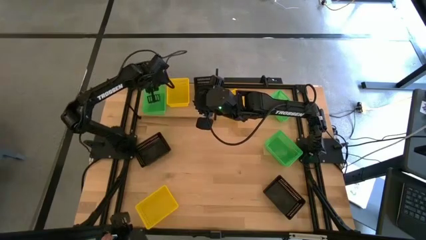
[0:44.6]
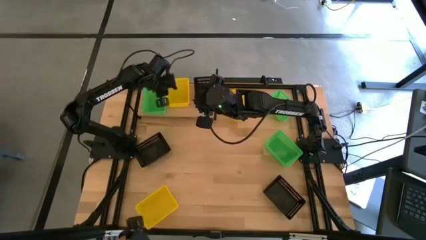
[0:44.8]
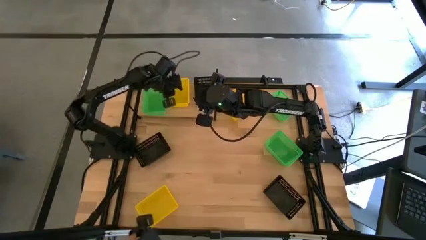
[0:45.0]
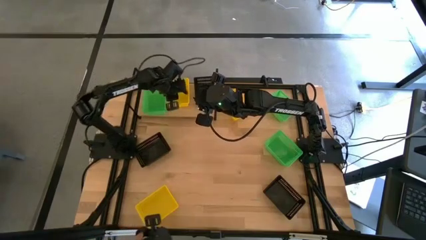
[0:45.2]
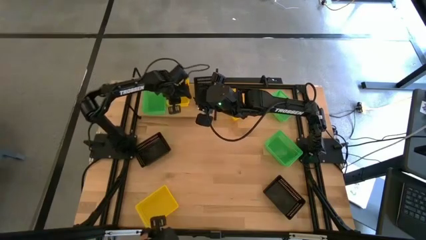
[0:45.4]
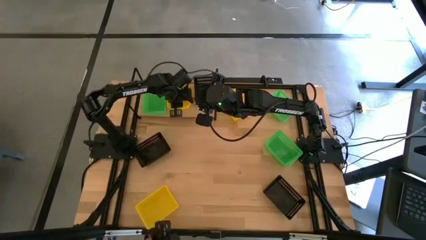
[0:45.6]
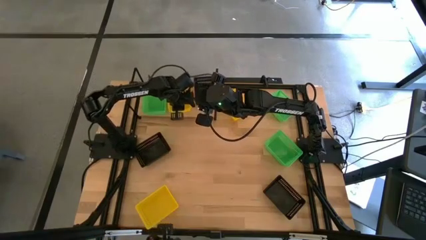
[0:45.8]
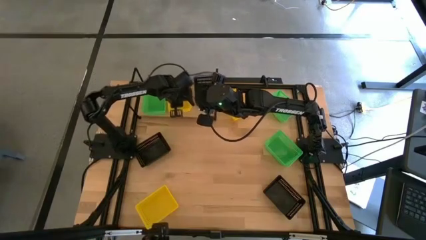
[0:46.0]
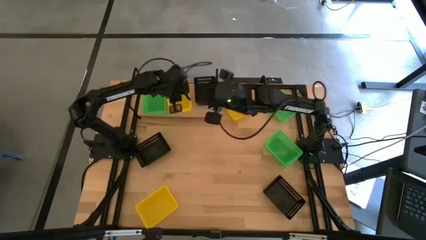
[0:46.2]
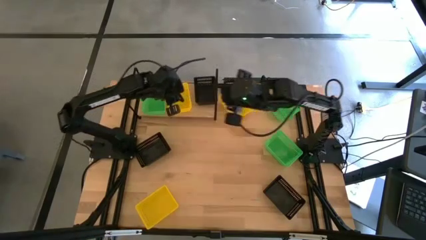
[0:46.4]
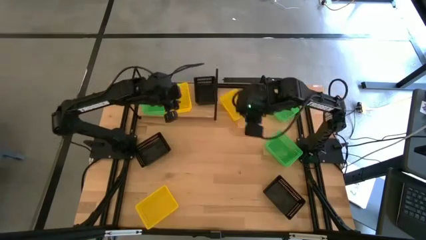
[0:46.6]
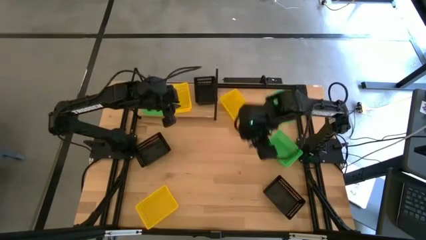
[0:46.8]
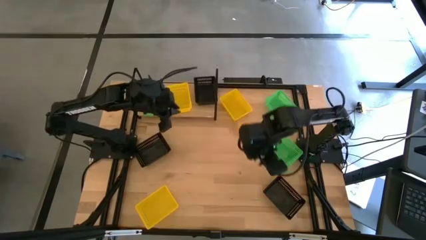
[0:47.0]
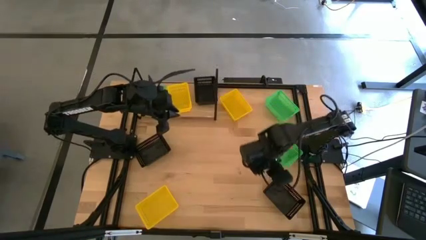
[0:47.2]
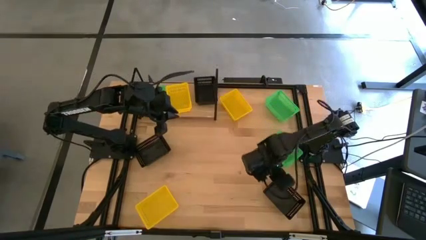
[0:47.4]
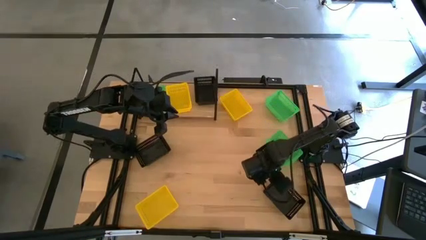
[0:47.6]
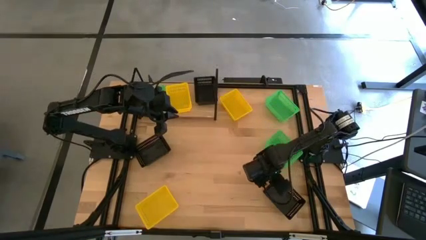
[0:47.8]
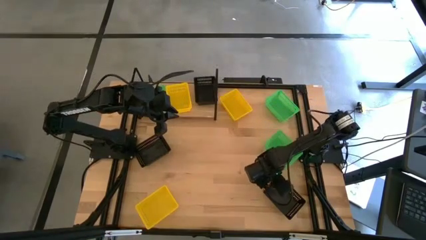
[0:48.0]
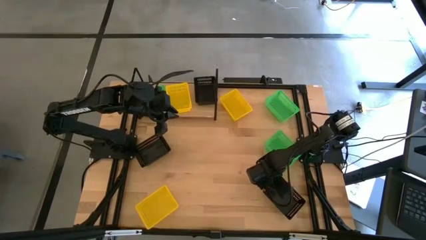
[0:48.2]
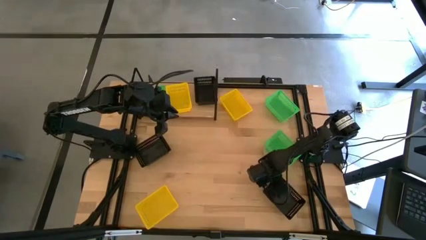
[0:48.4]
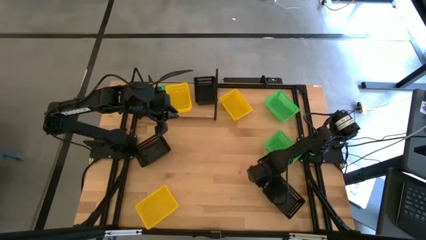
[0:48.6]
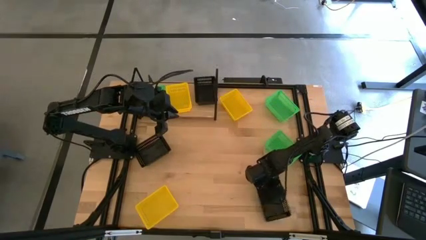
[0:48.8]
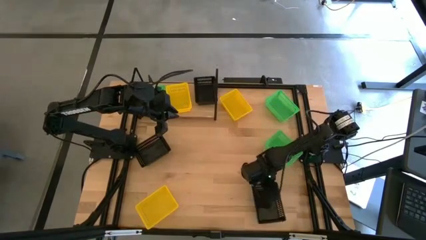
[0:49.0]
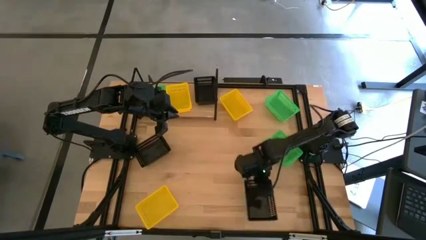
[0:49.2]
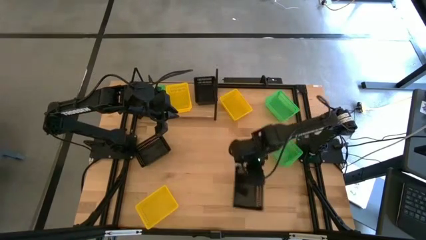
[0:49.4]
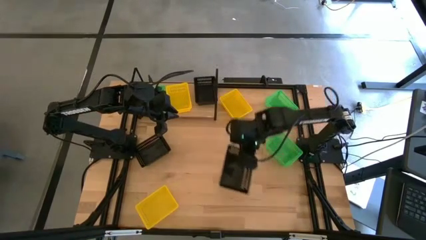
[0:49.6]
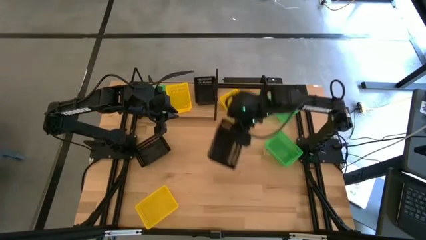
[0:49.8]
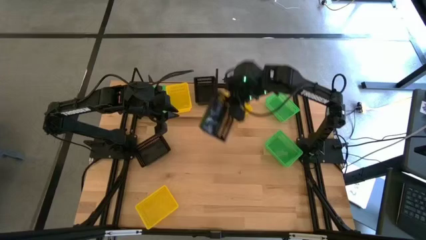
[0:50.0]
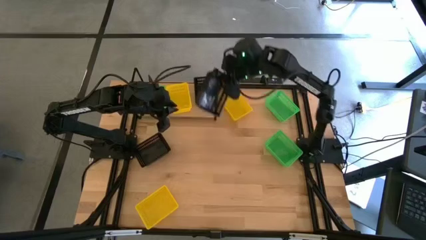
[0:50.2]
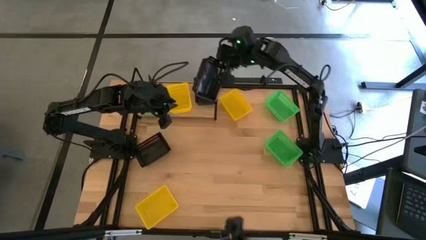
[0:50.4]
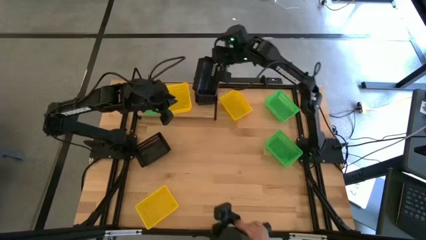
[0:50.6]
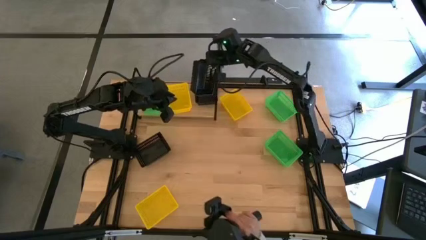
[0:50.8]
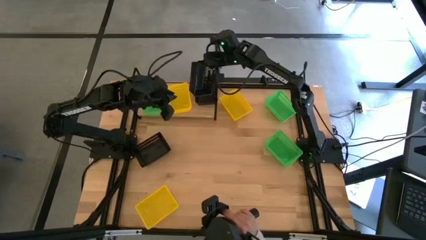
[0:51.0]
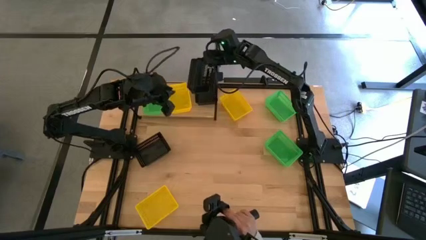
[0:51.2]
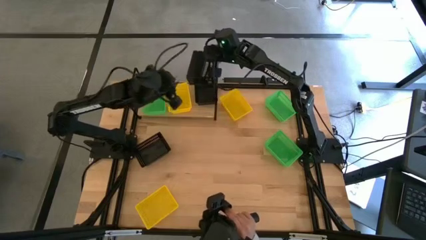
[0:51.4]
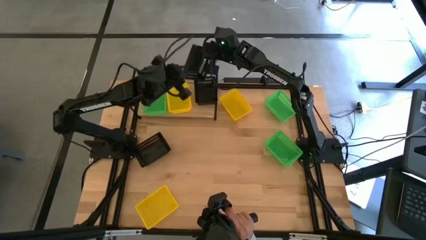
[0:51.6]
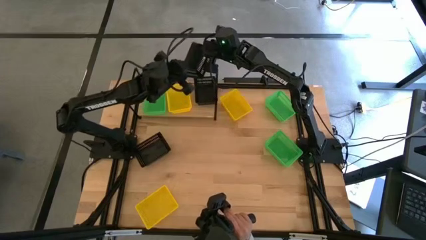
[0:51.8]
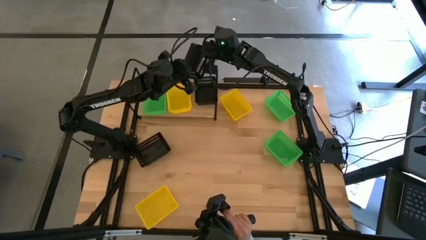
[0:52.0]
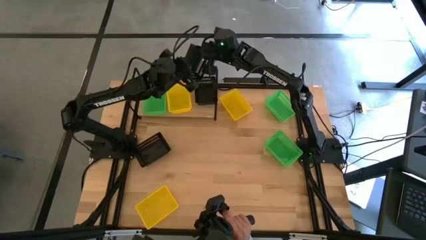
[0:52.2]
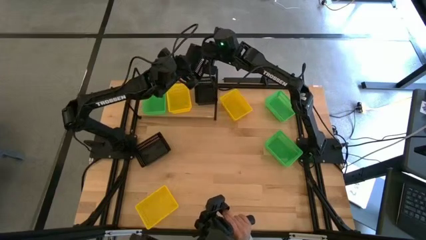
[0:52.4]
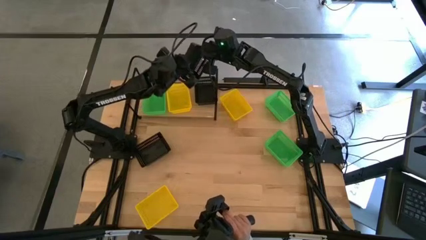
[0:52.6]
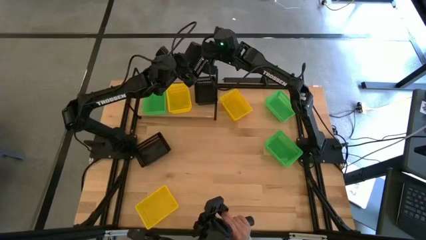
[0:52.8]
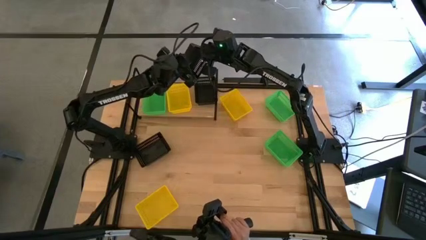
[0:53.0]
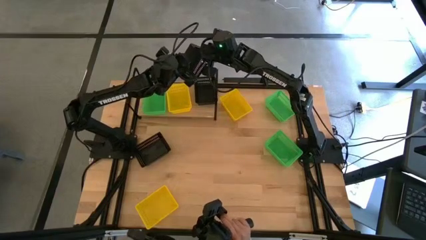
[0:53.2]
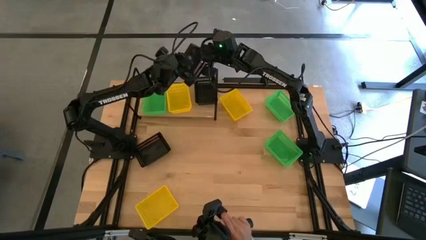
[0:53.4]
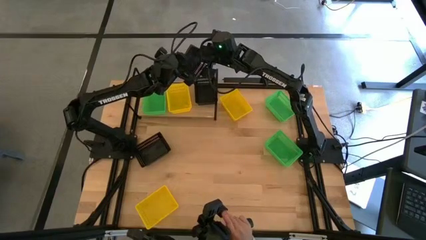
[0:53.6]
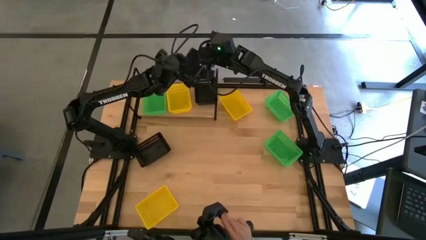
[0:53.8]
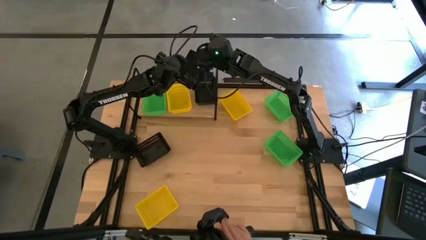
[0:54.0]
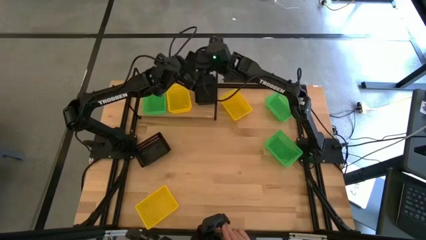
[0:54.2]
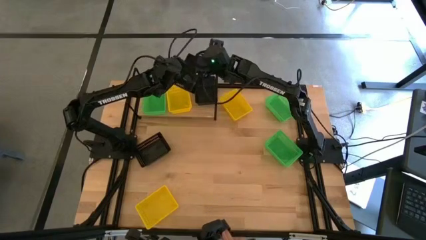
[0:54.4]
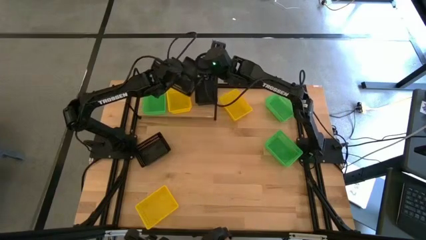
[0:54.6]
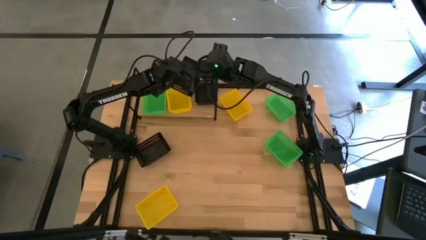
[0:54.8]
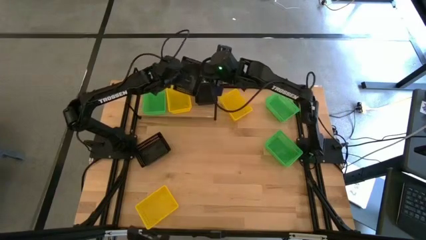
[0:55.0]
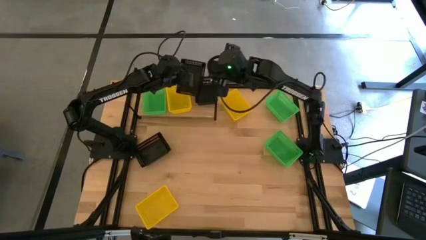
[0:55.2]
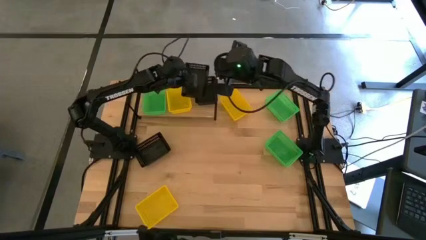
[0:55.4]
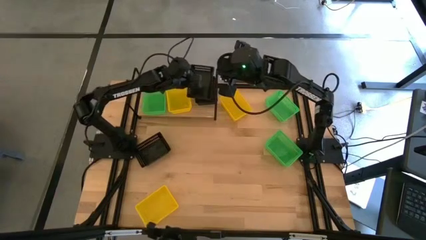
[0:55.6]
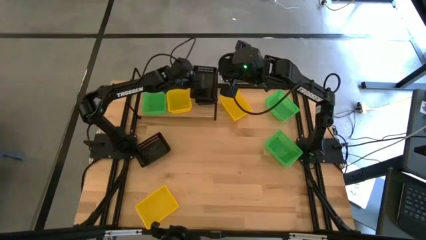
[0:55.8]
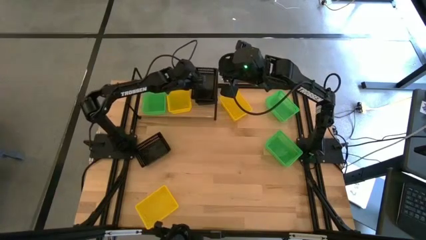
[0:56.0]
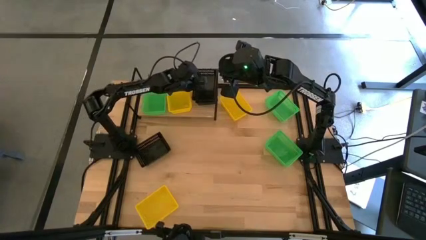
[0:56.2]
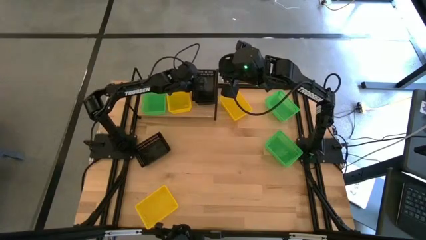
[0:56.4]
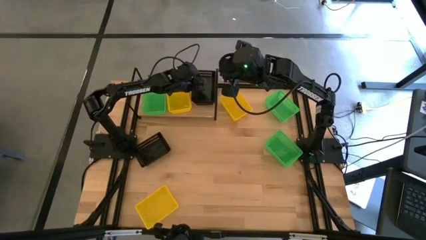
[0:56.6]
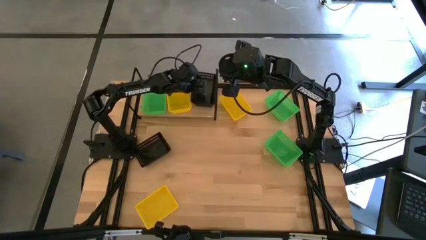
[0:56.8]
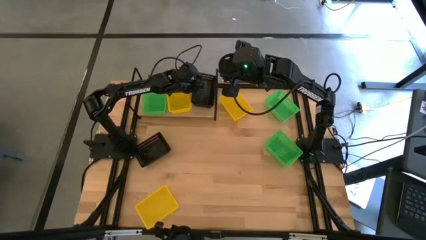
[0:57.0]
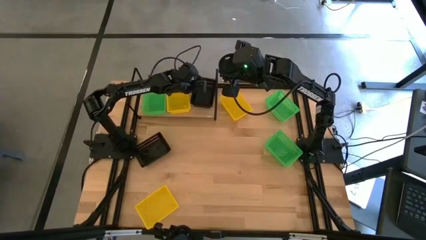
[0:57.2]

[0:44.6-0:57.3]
Task: Stack baskets on shelf by color
Stack the bottom black basket on the black basket on the shelf
